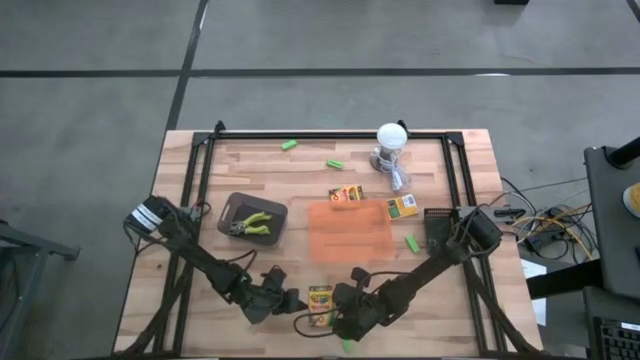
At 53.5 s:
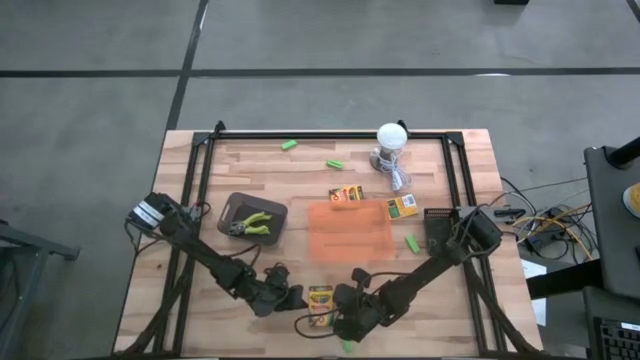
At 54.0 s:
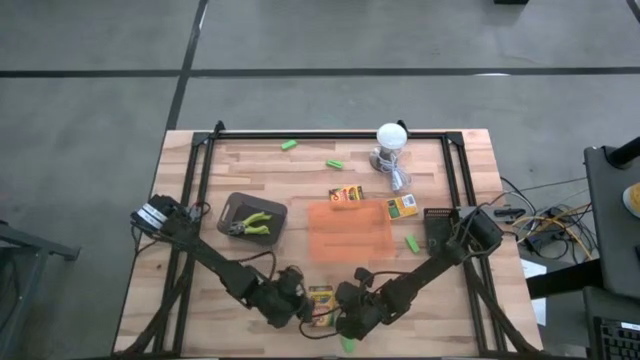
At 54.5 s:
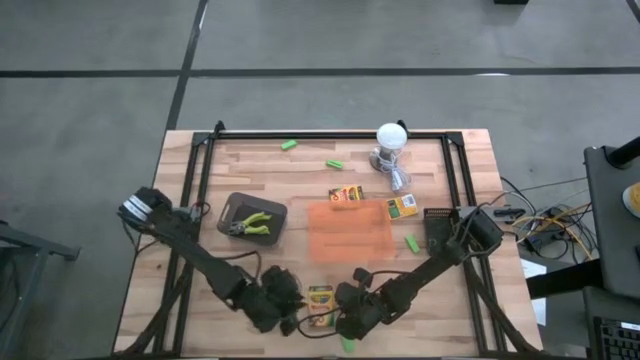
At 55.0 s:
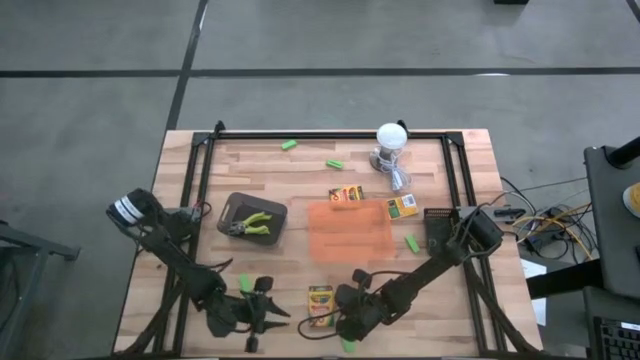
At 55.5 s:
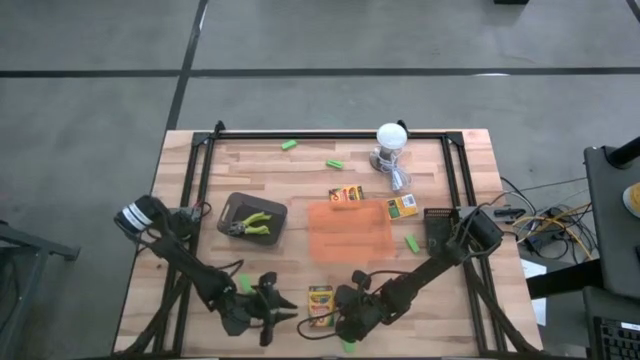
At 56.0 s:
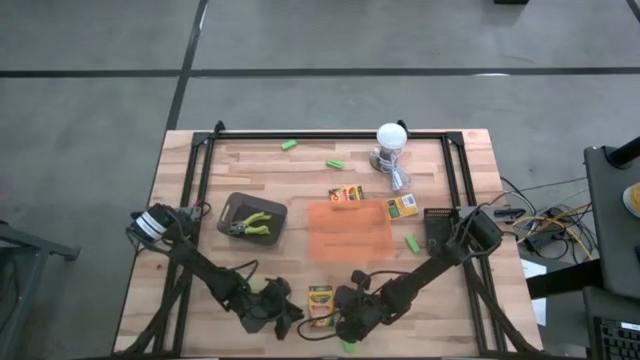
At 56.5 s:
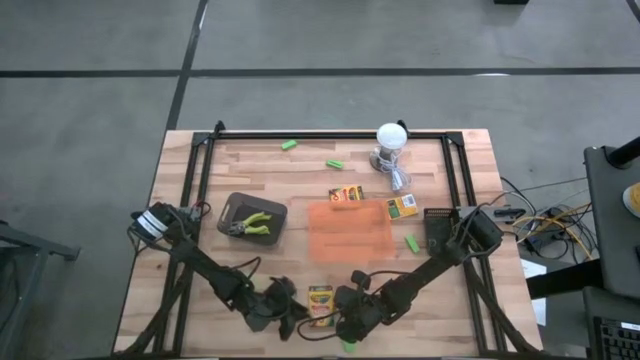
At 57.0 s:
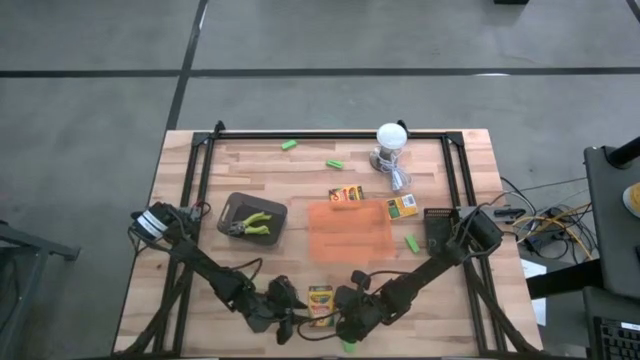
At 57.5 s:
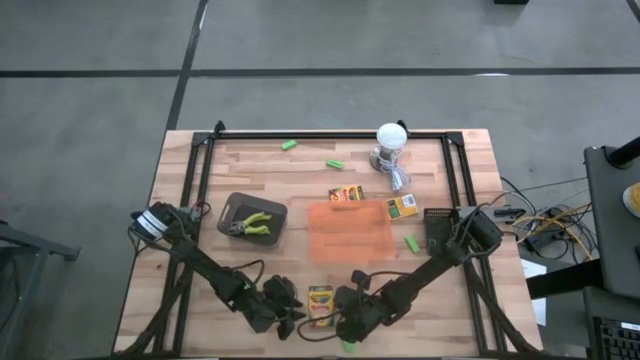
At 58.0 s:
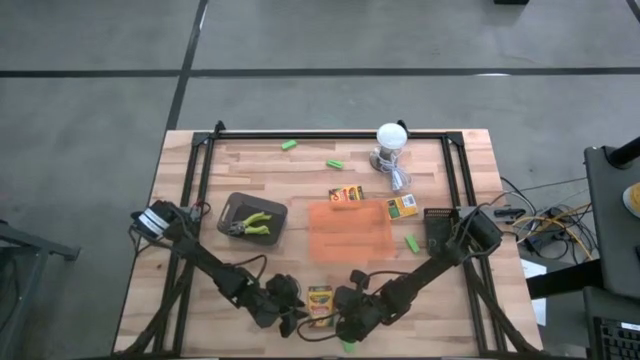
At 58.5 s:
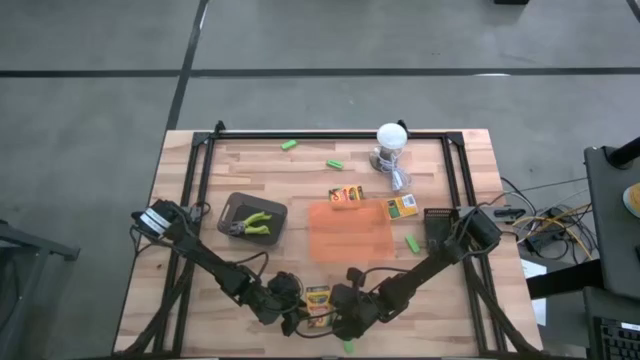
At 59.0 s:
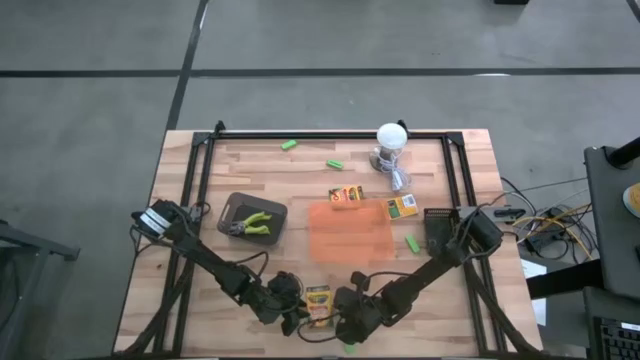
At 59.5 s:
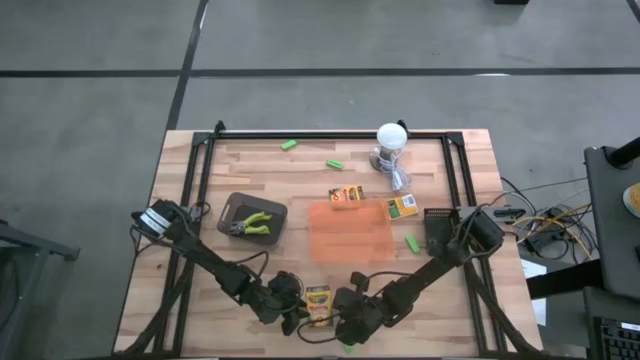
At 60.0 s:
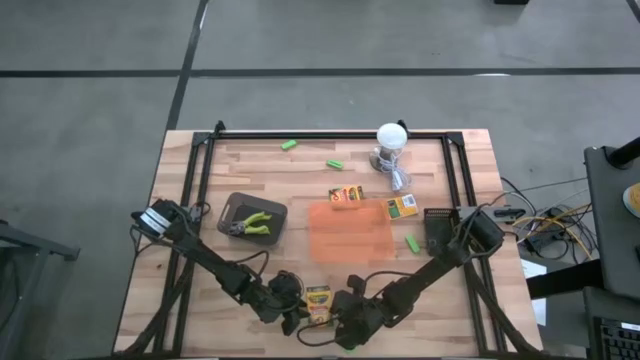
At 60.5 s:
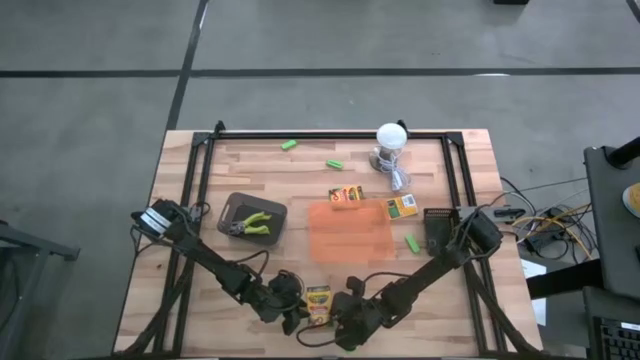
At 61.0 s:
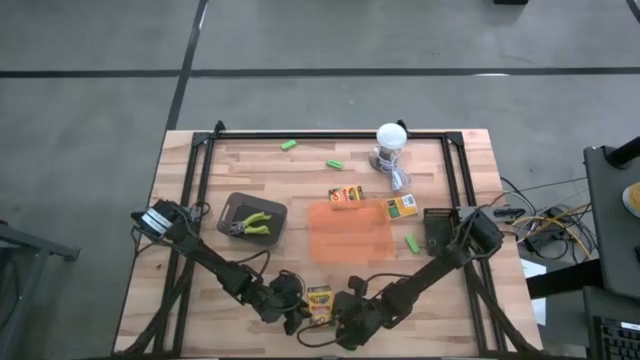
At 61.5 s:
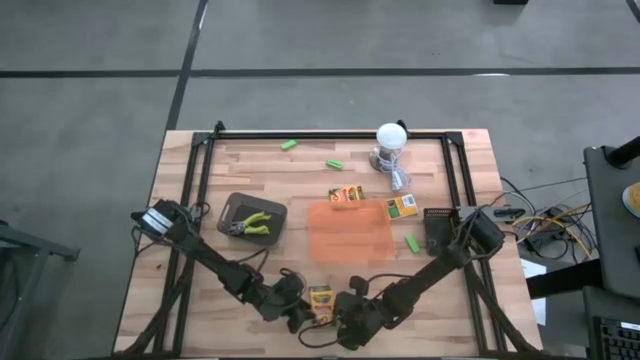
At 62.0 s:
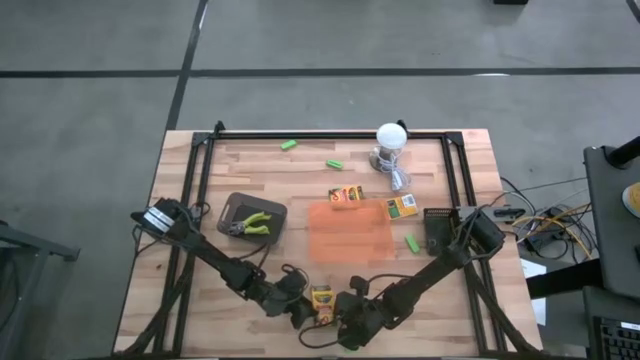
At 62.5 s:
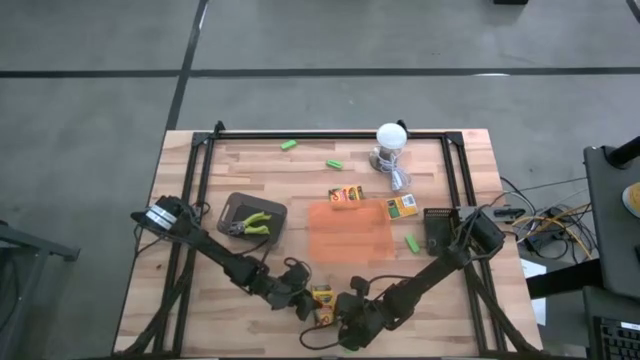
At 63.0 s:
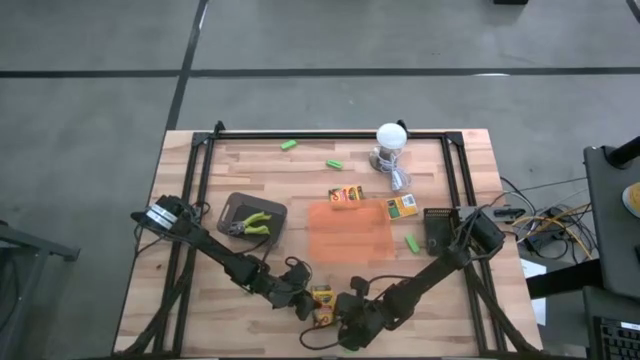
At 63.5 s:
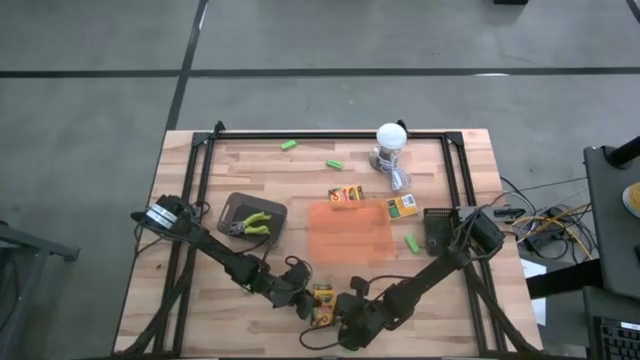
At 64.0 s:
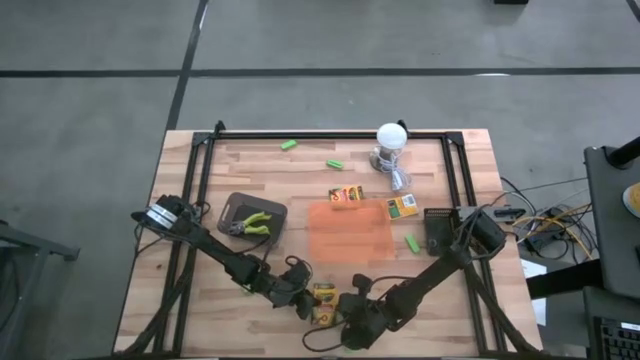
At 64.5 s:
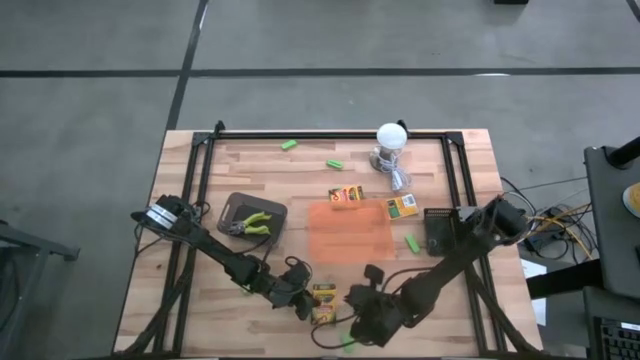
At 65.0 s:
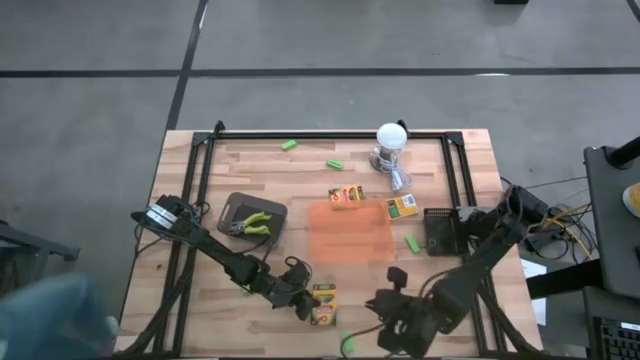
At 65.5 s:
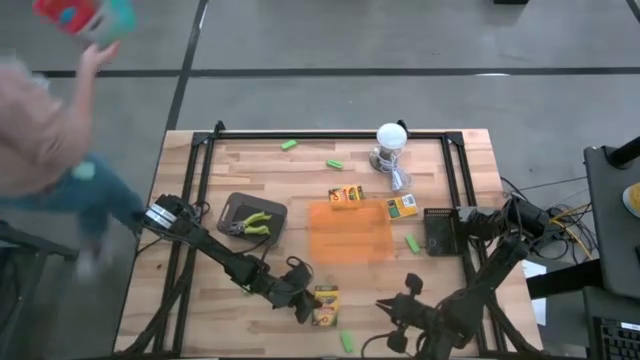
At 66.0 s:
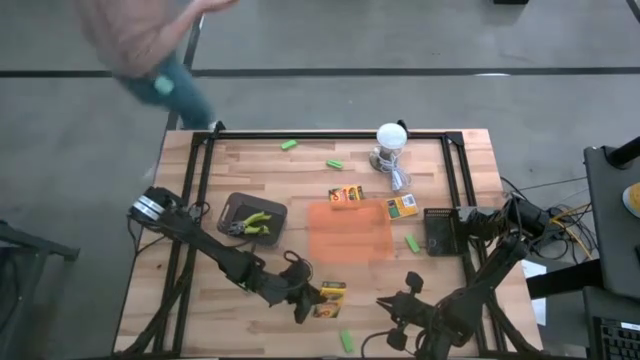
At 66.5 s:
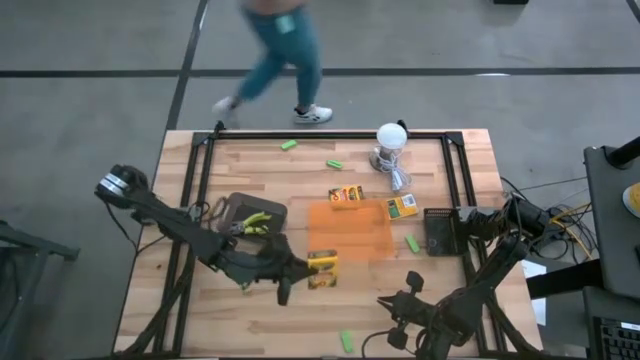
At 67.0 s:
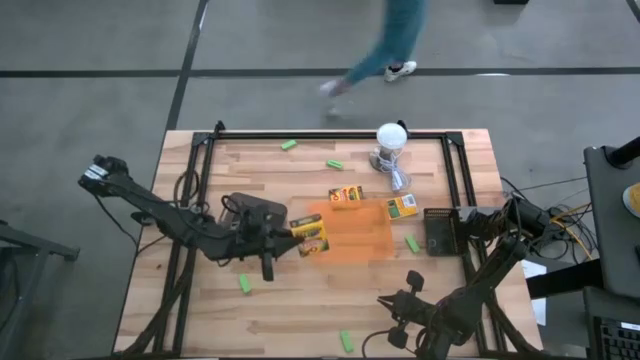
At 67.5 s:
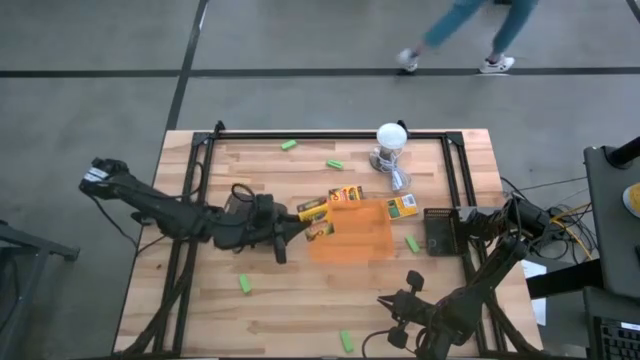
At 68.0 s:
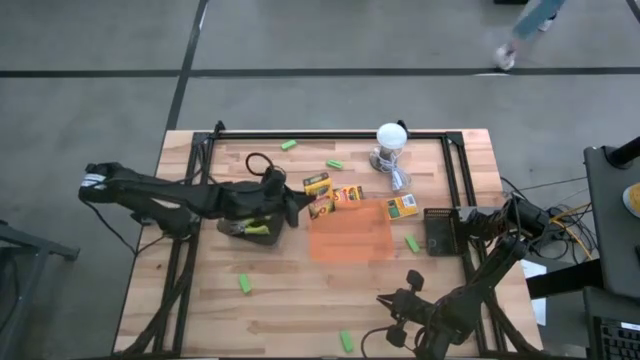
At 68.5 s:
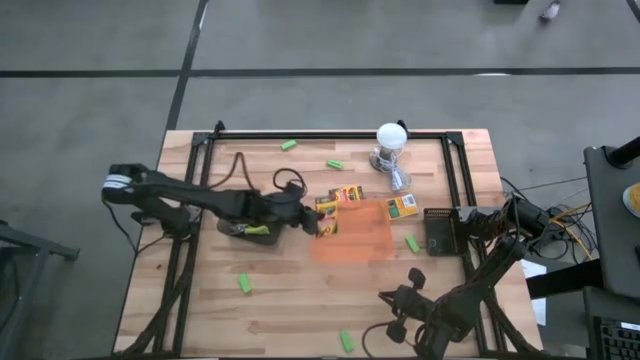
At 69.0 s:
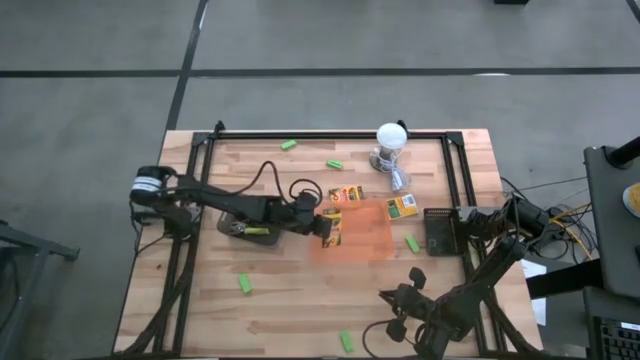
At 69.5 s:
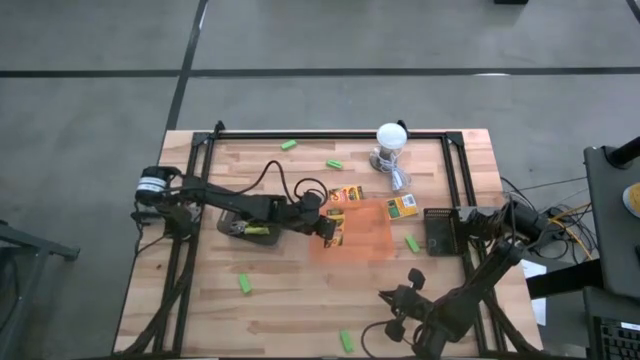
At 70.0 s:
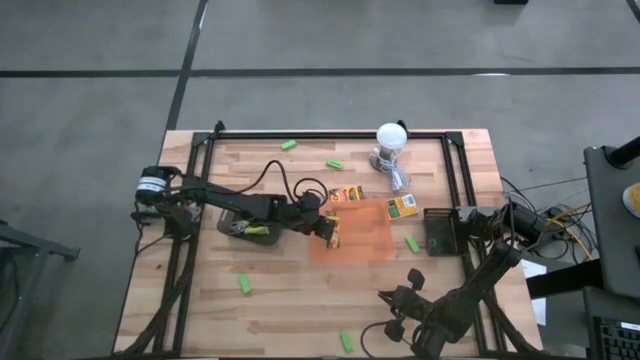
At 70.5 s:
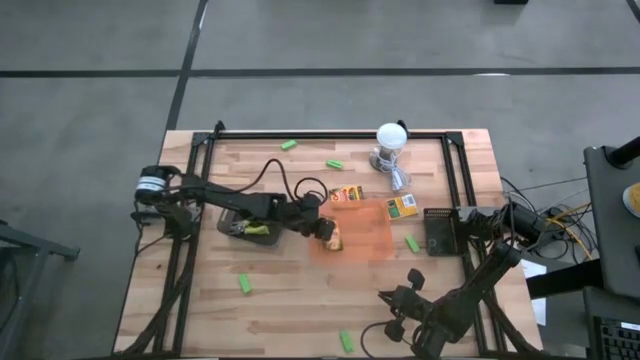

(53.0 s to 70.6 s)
Task: Pick & Place School Supplies
Put the bottom crayon box into the orange bin

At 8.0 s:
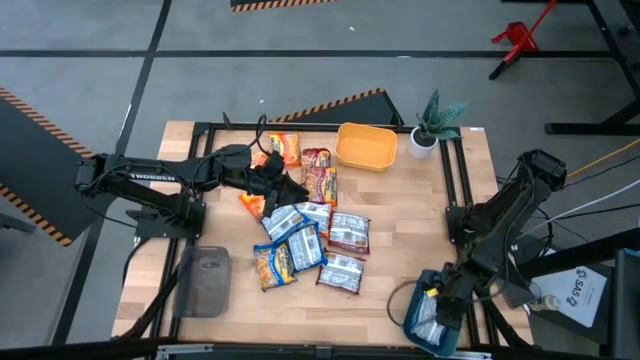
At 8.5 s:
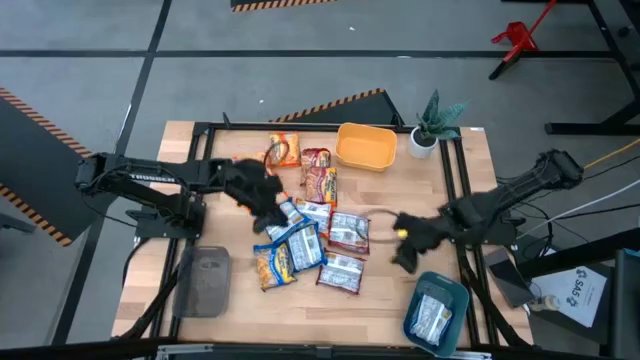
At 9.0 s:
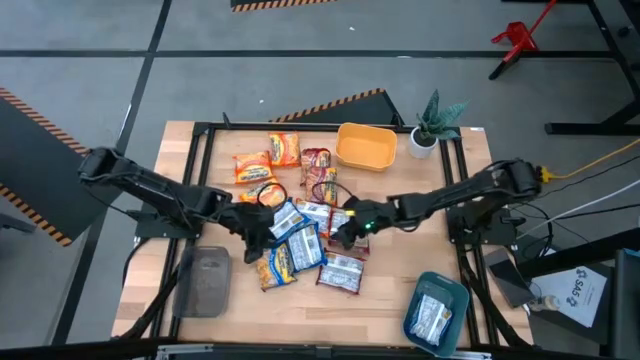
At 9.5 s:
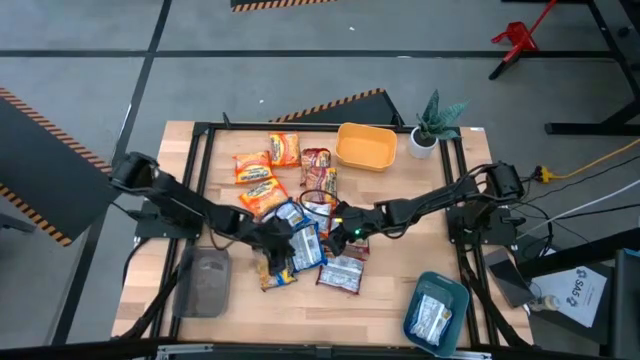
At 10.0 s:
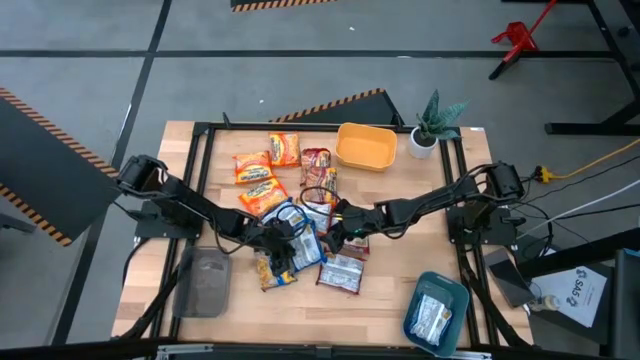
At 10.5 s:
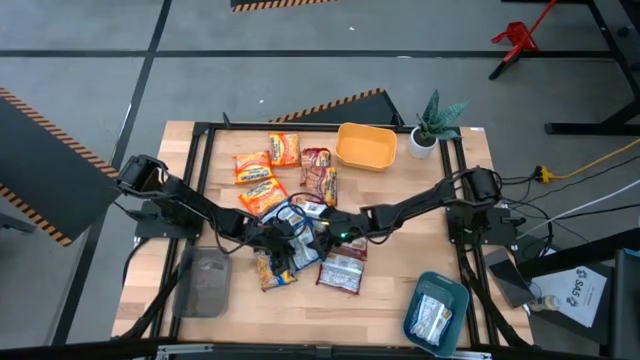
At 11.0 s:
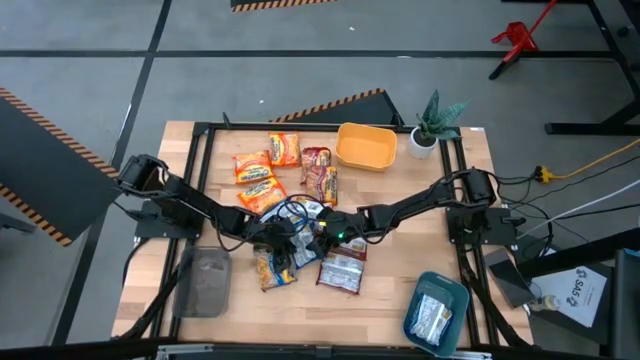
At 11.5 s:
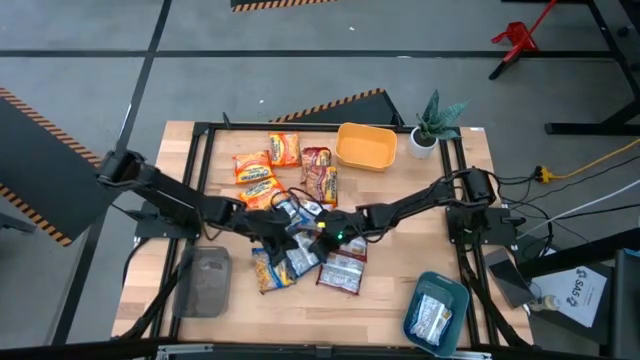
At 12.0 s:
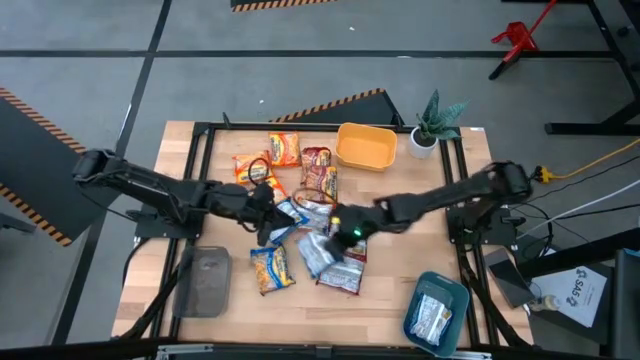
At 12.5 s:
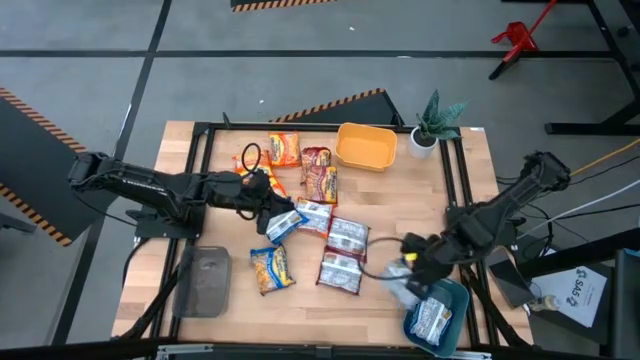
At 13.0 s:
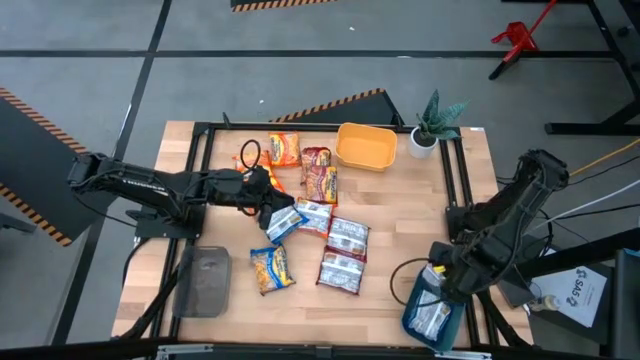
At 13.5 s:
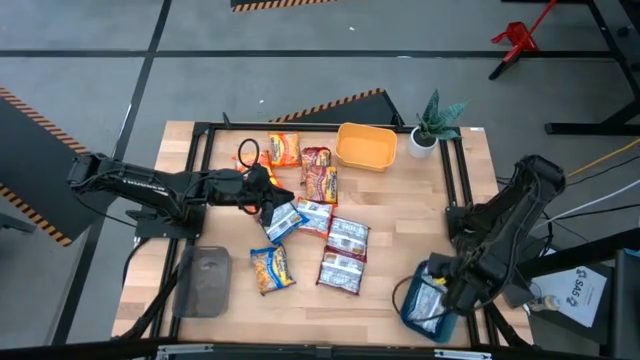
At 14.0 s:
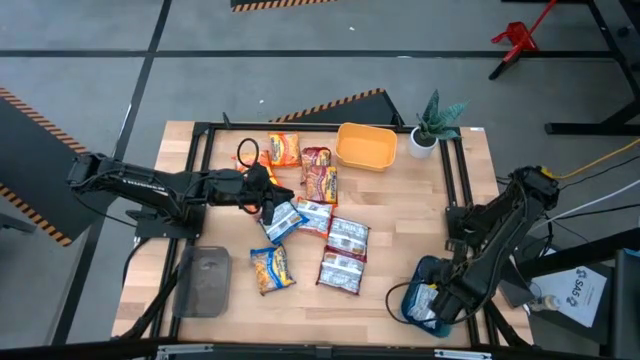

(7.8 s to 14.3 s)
Task: Sort Maruchan noodles
Put the blue noodle pack into the blue bin
